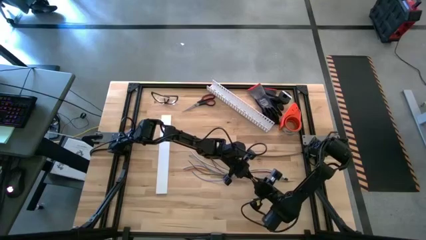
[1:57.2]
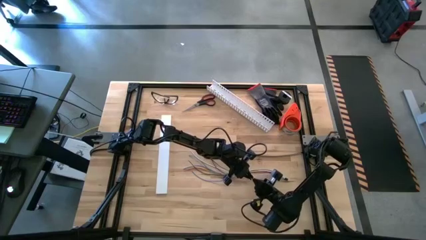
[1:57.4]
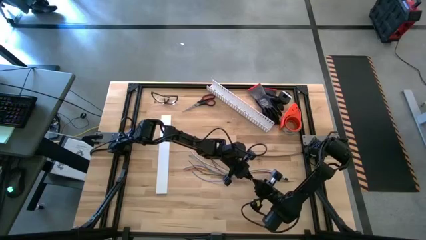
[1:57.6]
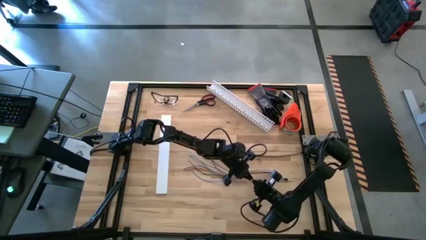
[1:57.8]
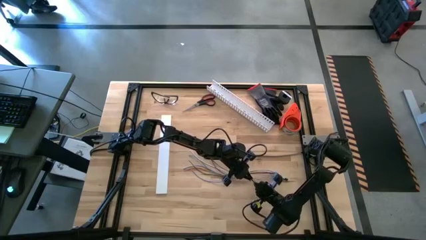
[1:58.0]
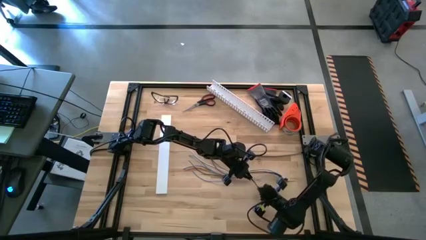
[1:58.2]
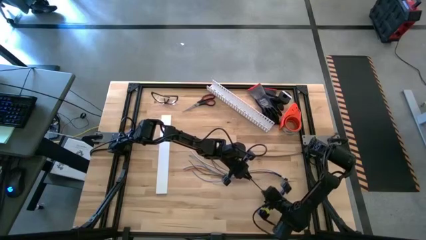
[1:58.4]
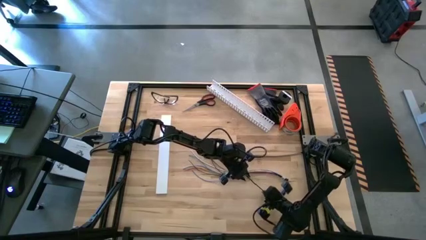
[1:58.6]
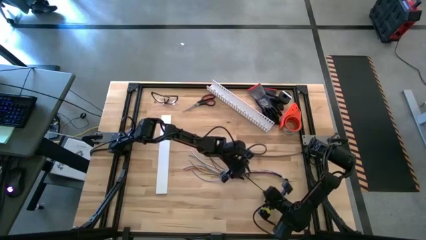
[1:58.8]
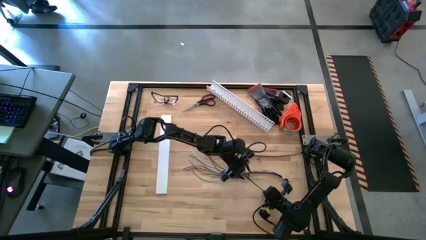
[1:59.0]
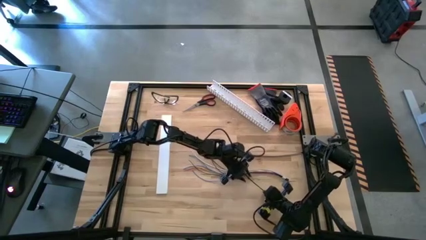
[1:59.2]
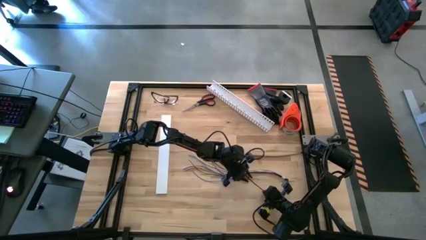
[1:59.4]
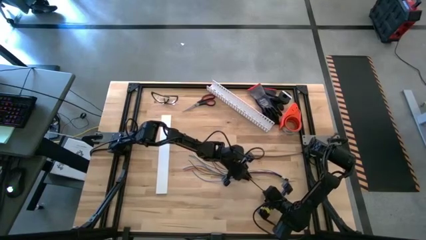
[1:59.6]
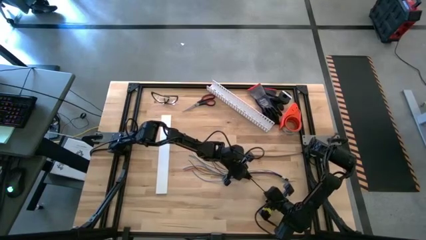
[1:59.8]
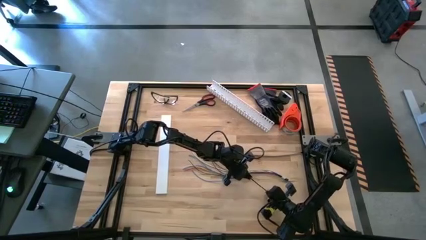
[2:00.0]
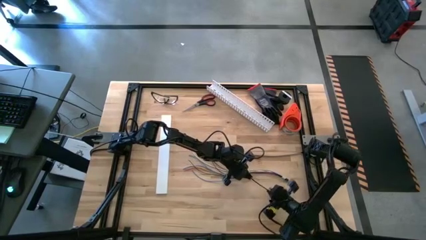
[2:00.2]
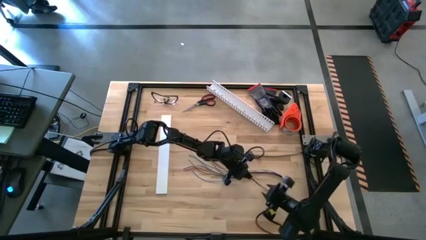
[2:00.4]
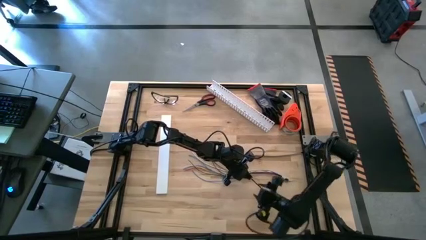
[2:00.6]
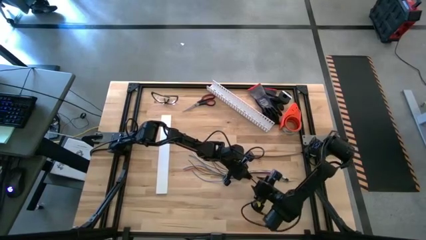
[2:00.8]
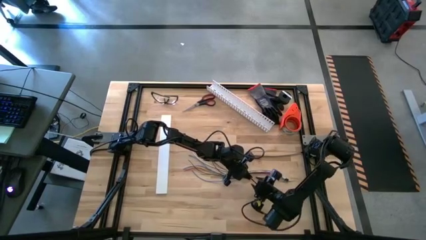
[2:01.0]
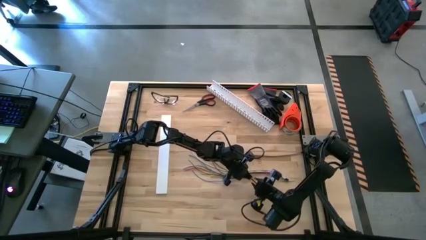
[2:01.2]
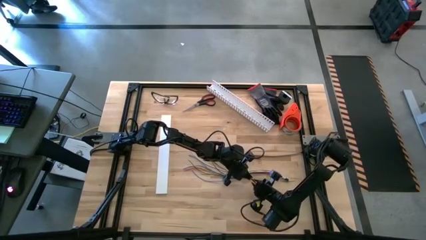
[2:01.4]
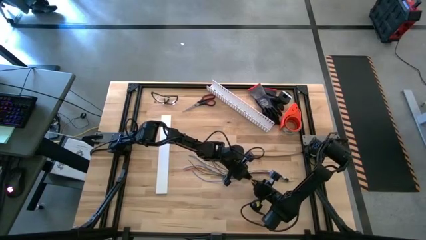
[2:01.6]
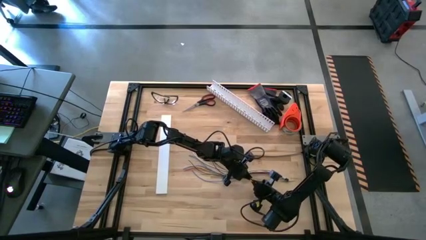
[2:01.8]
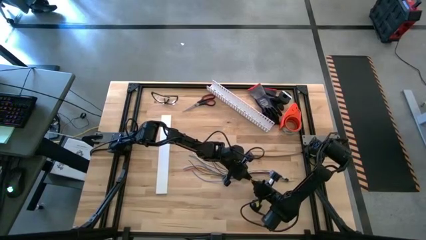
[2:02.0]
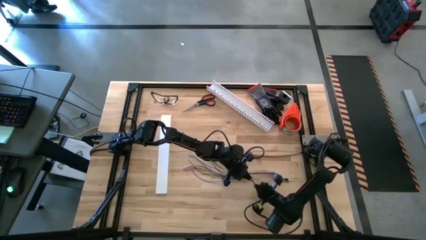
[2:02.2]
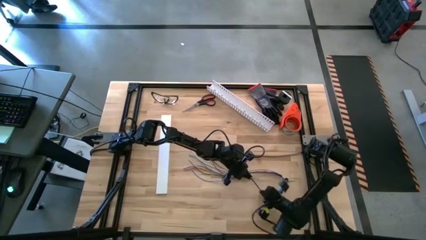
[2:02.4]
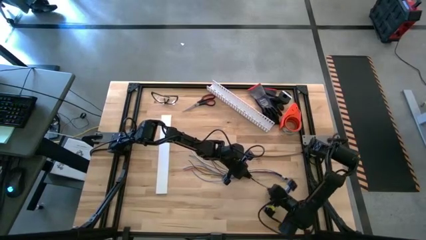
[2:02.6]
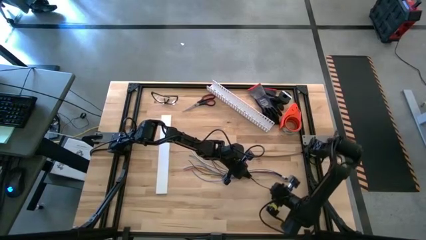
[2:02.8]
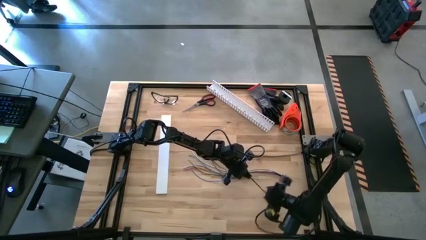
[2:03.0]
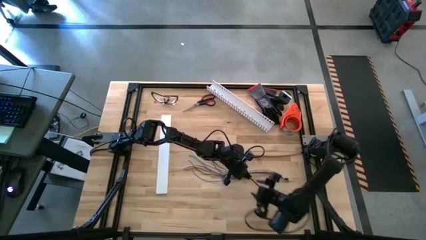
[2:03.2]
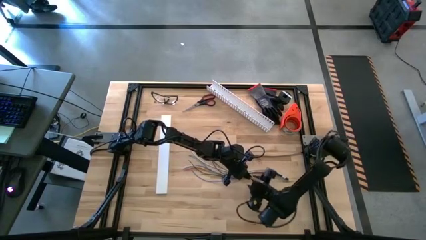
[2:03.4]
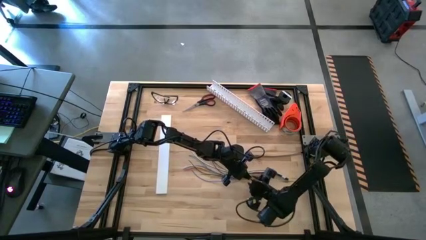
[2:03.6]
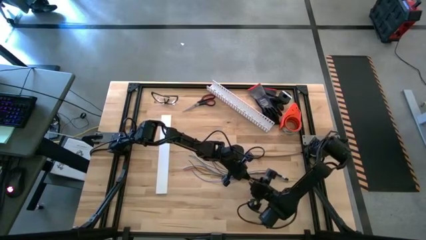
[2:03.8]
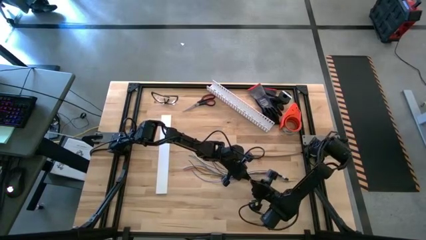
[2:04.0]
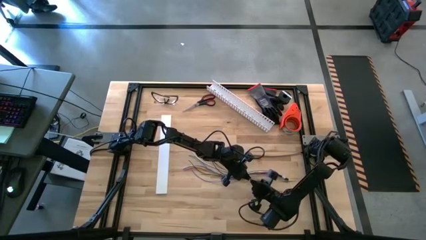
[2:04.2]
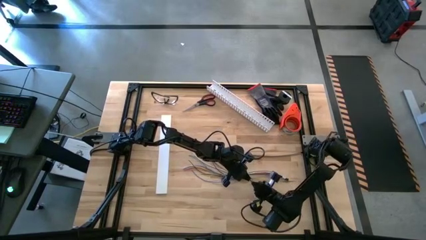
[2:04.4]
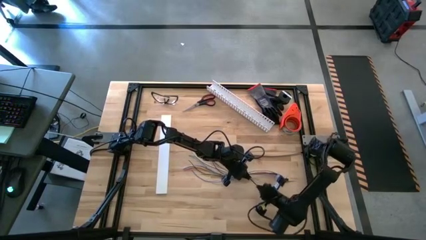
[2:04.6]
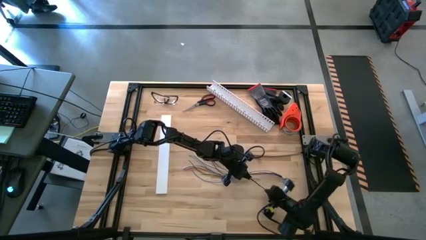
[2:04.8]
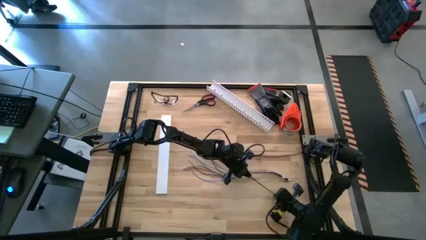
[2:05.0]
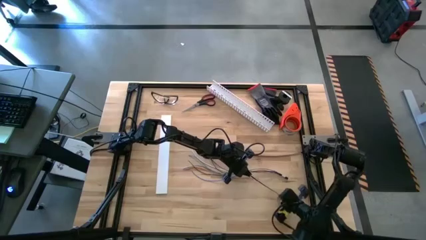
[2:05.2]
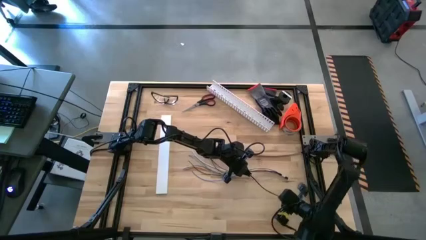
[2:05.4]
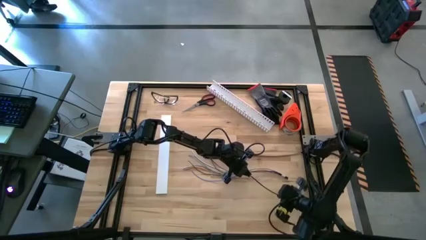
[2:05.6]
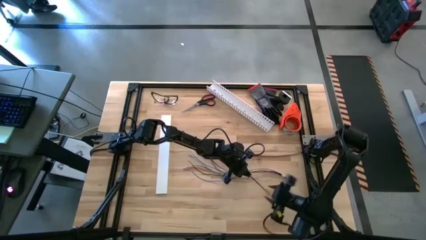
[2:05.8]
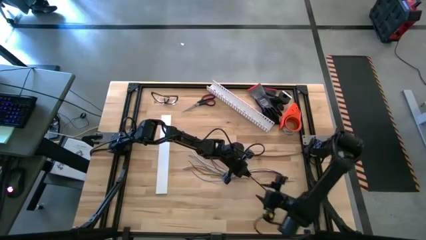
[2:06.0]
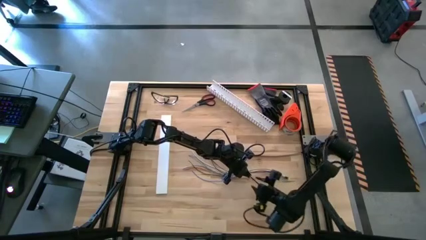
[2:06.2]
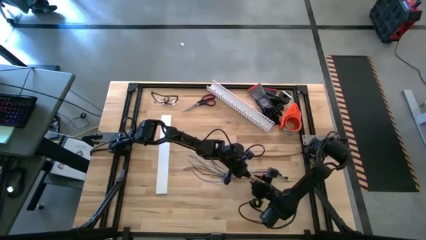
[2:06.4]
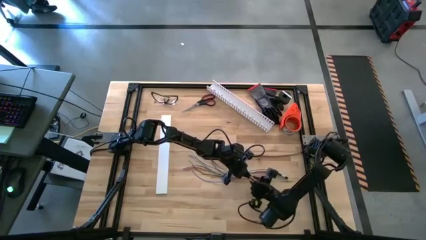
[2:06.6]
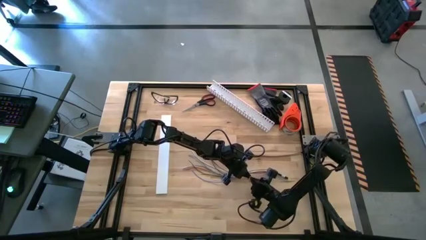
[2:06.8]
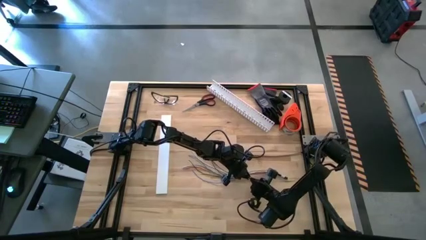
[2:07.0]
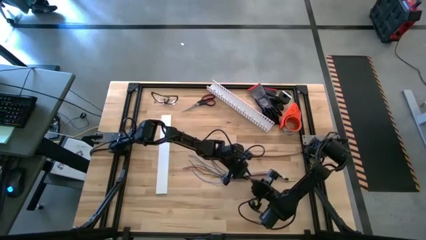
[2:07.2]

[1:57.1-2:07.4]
Task: Ziptie cables
Wrap the bottom black zip tie on the cable wires
